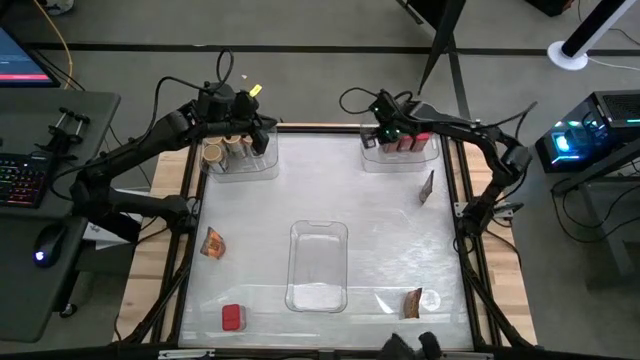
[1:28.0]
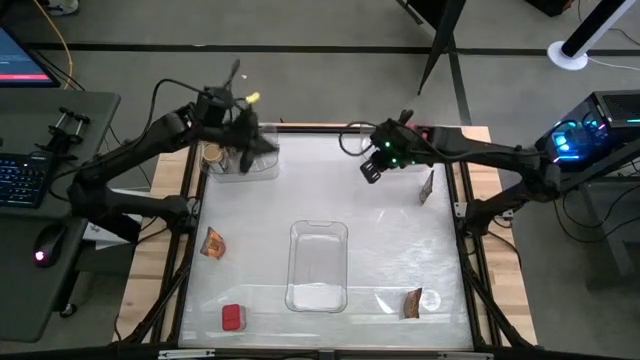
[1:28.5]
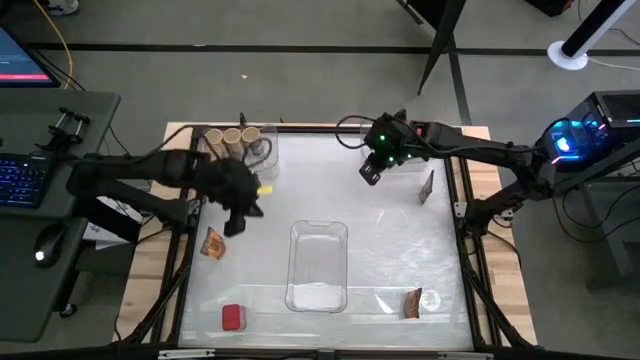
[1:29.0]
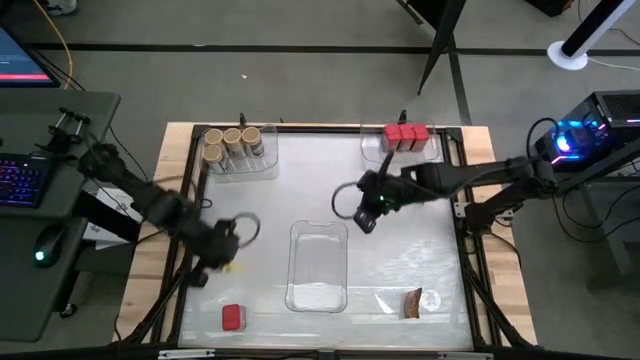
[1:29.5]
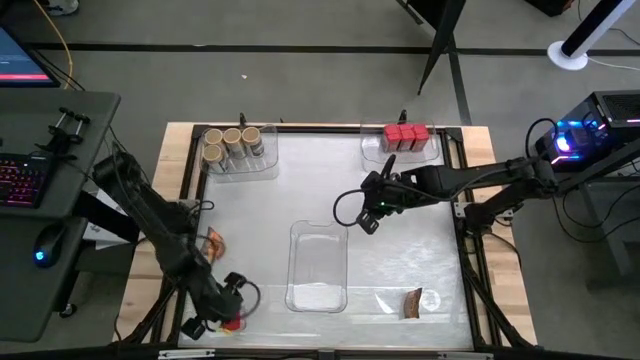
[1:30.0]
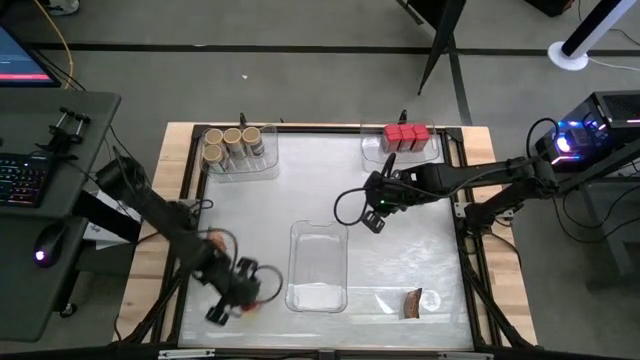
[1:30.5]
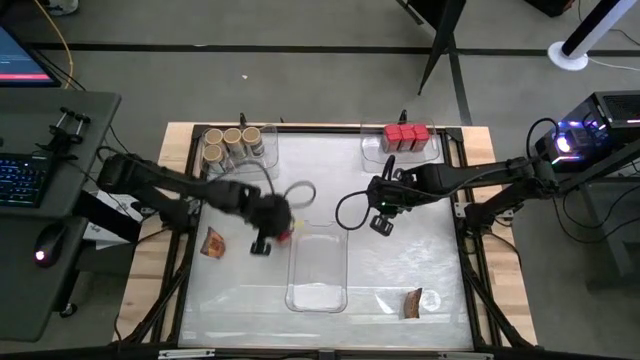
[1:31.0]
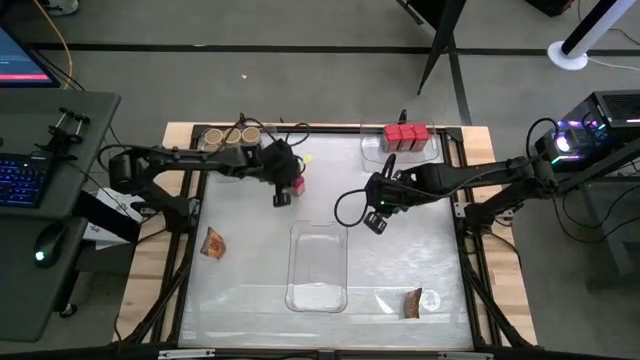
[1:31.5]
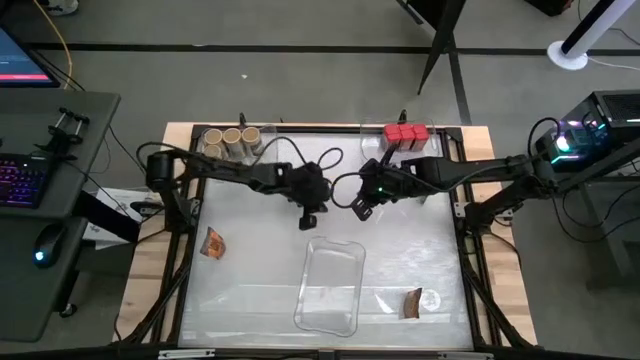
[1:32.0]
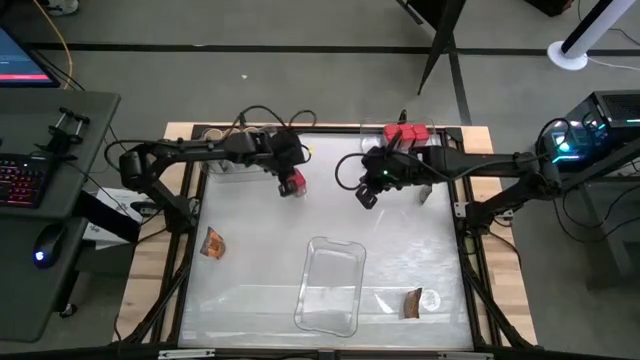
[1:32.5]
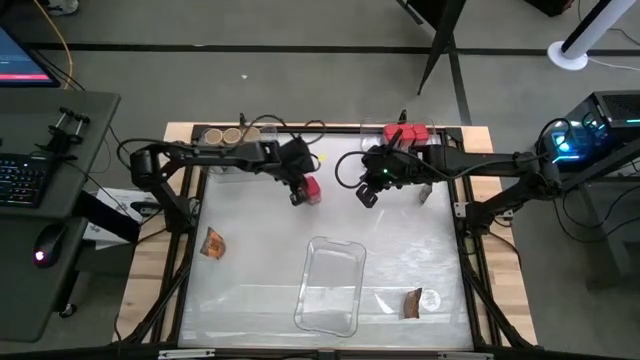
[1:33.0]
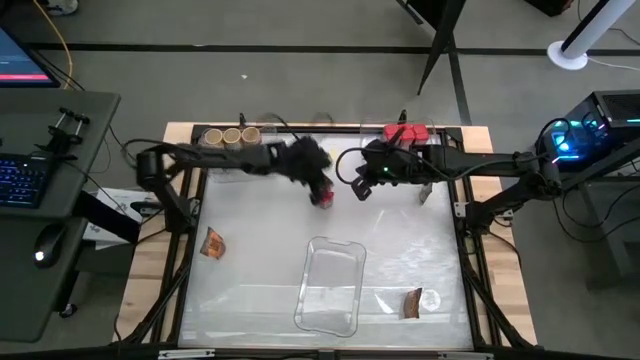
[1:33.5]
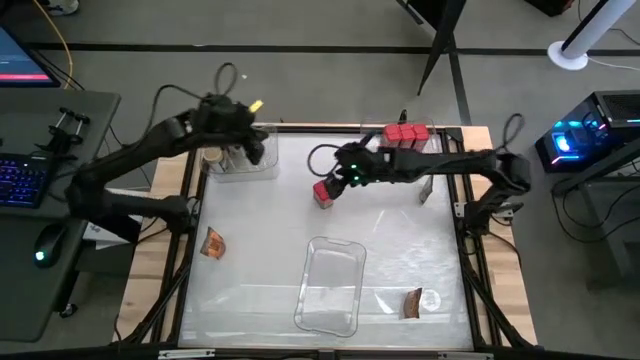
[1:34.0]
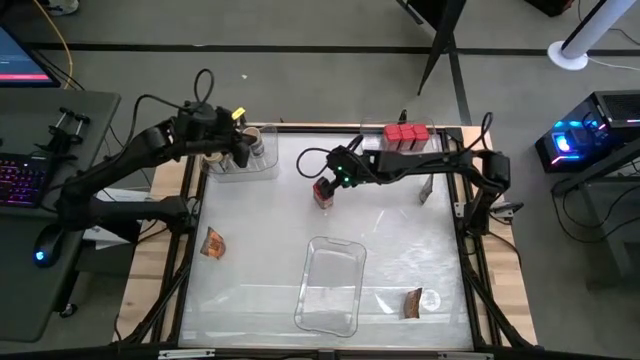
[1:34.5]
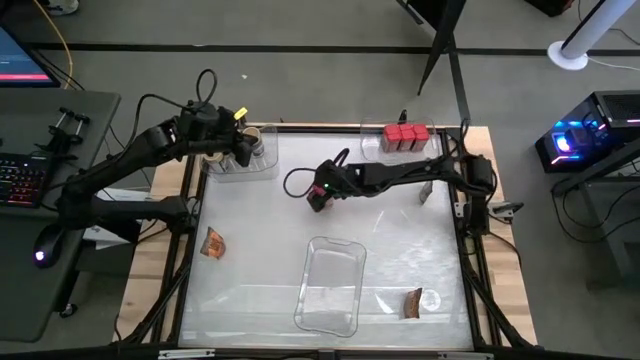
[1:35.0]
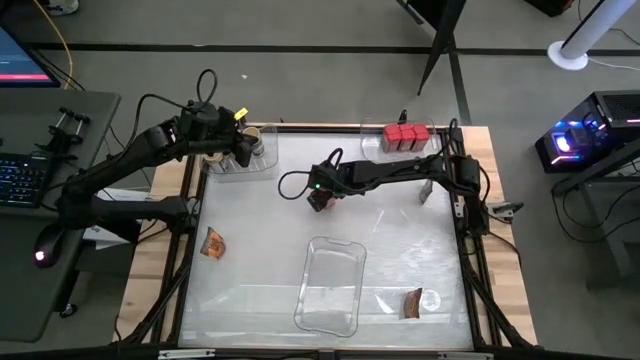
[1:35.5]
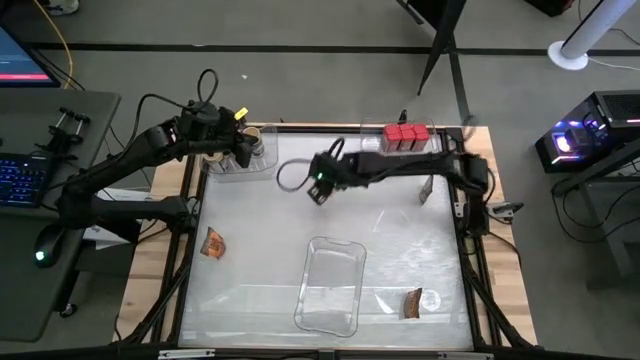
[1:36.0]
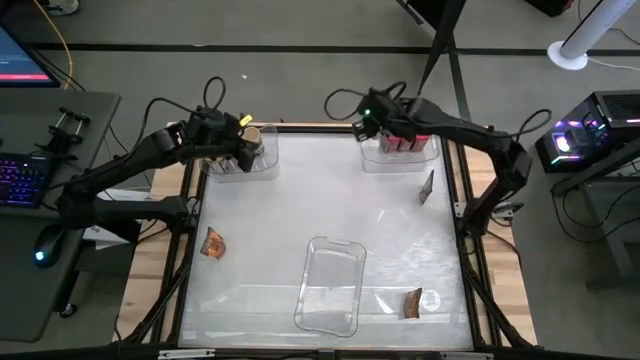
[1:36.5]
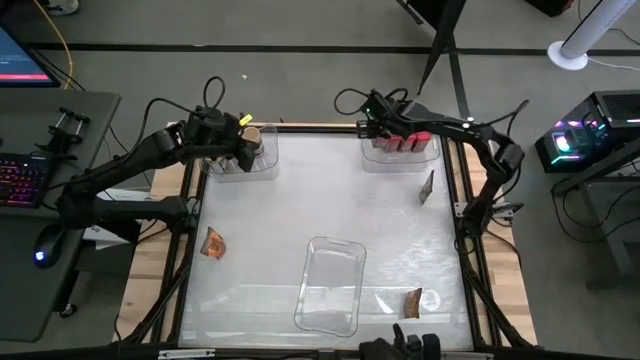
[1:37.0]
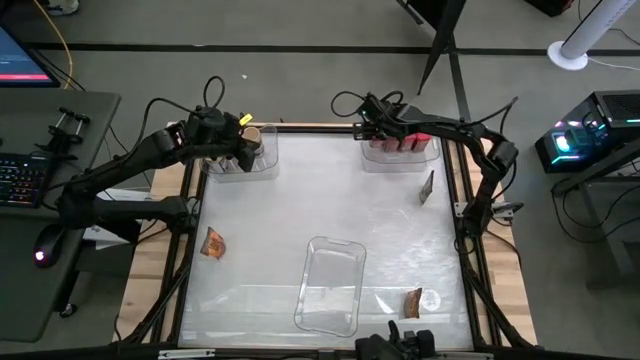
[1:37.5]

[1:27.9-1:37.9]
Task: Sort spices by type
Put the red seasoning can into the top right transparent bin

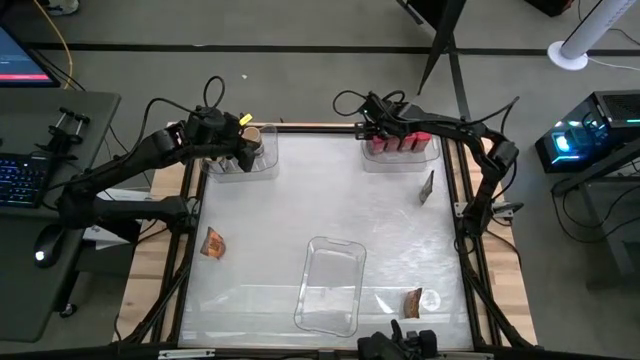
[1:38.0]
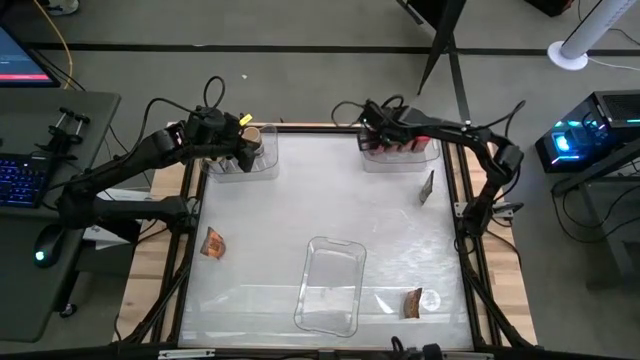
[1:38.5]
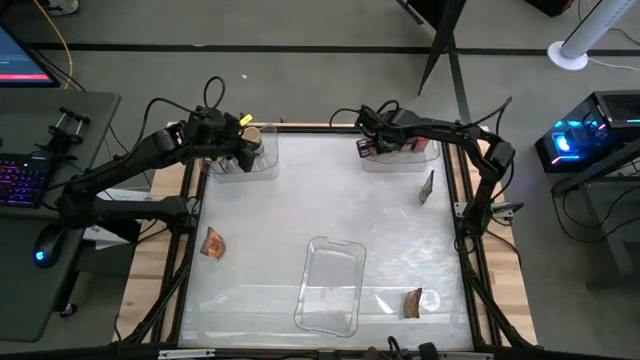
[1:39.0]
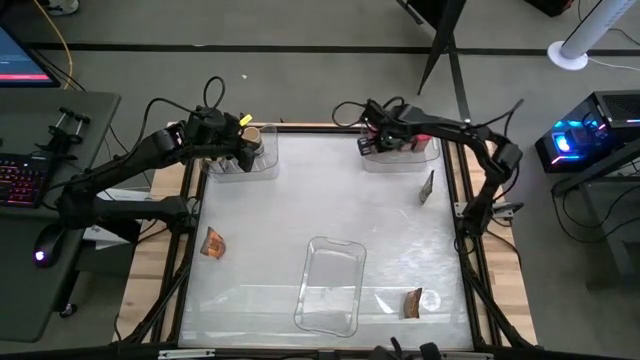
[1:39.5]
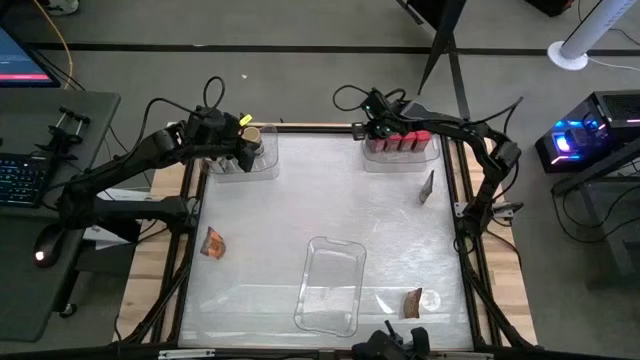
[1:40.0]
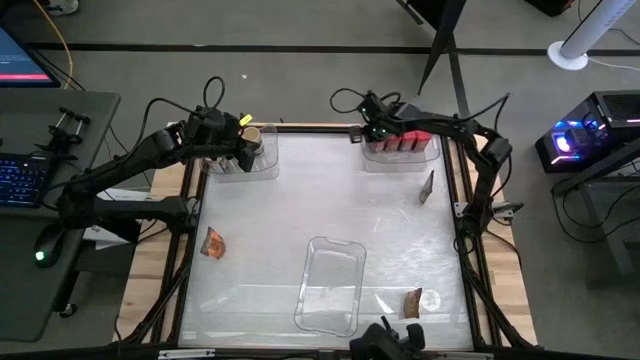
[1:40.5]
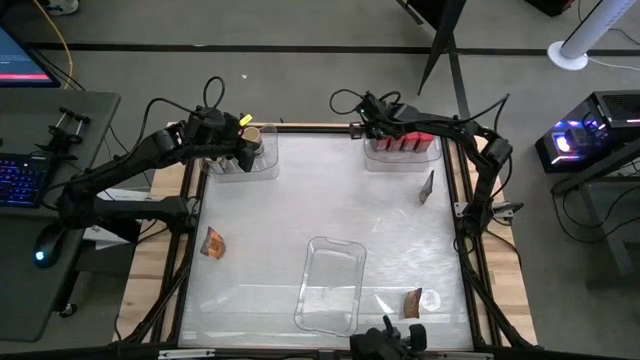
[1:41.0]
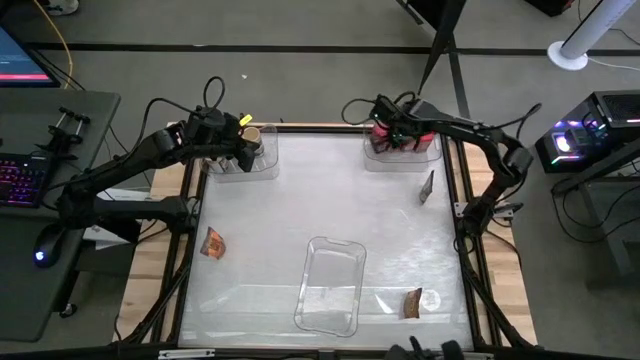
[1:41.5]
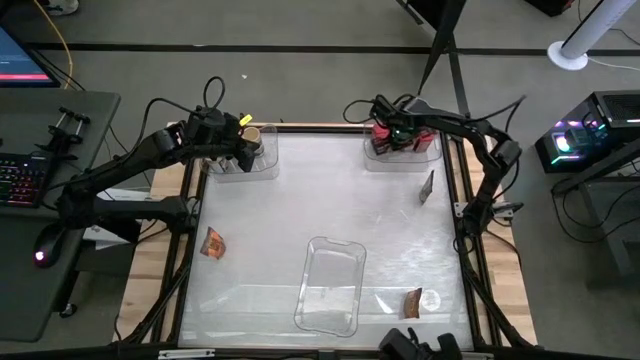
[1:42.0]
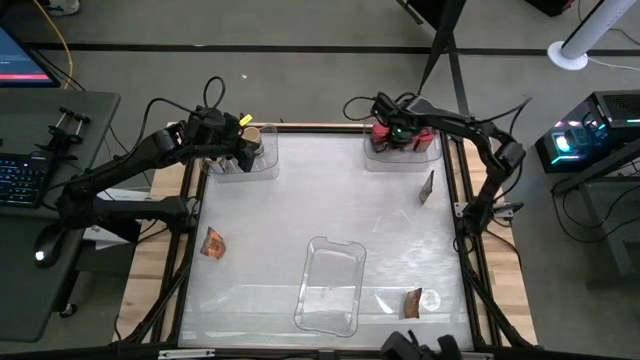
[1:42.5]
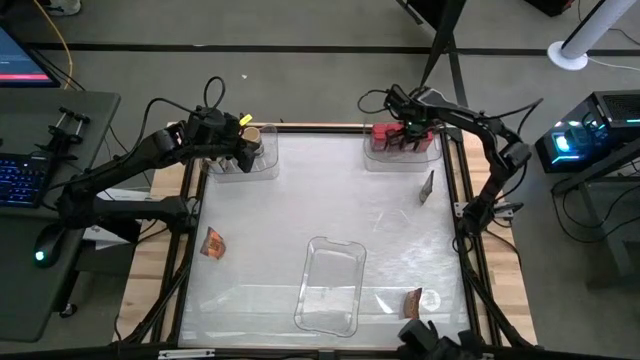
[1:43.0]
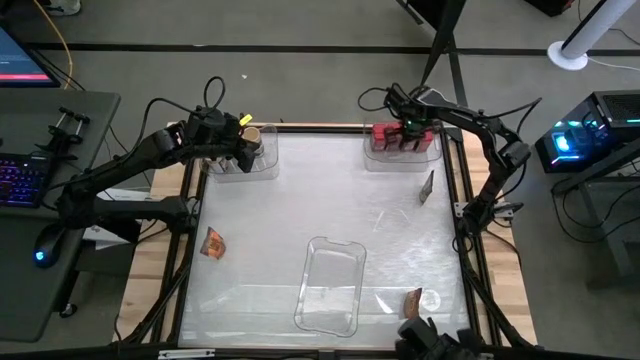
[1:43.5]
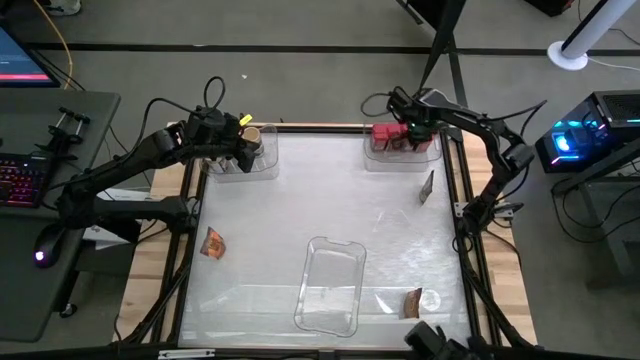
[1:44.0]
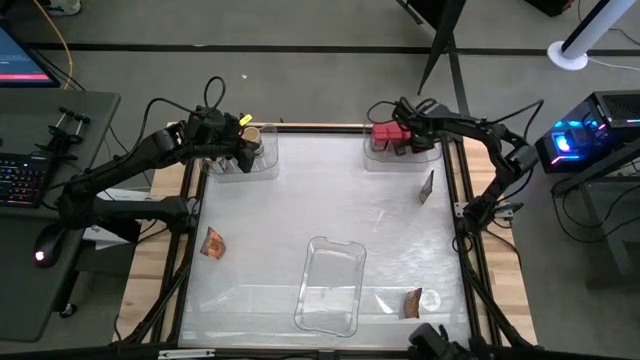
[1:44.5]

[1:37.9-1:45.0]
Adjust the red seasoning cans

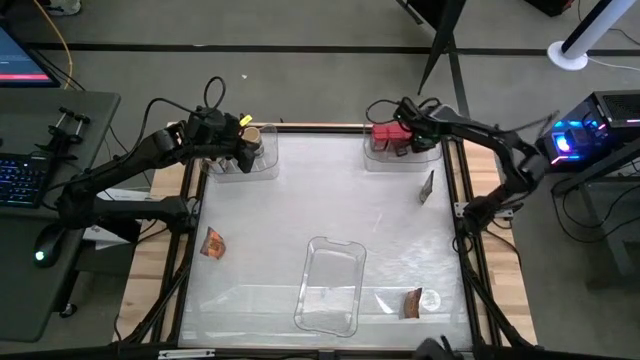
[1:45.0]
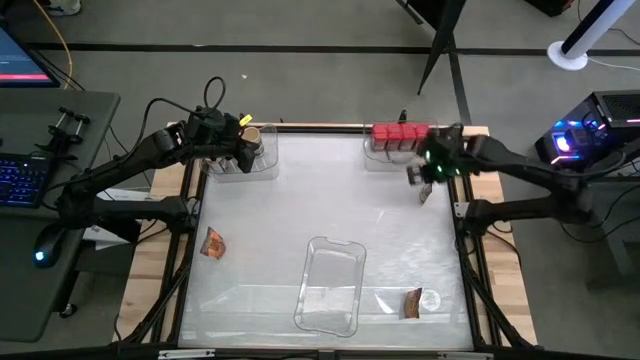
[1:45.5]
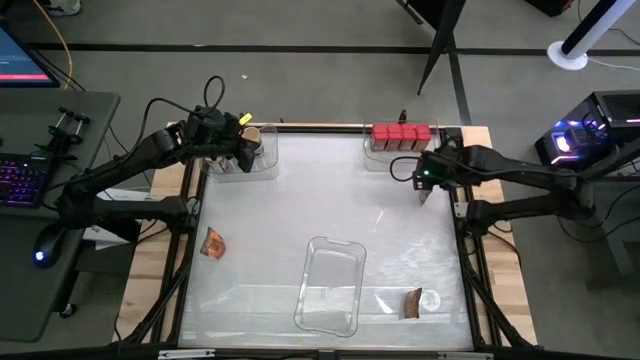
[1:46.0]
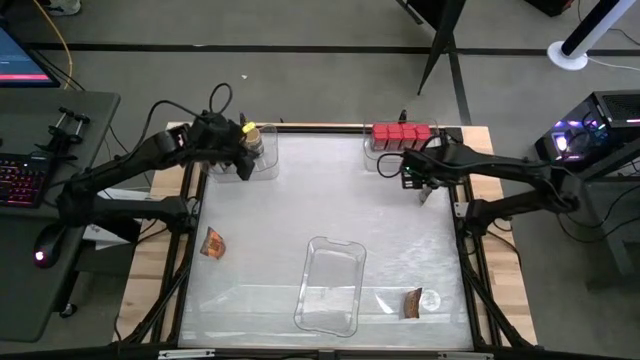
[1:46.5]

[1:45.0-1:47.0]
Put the top orange seasoning pack into the bottom transparent bin

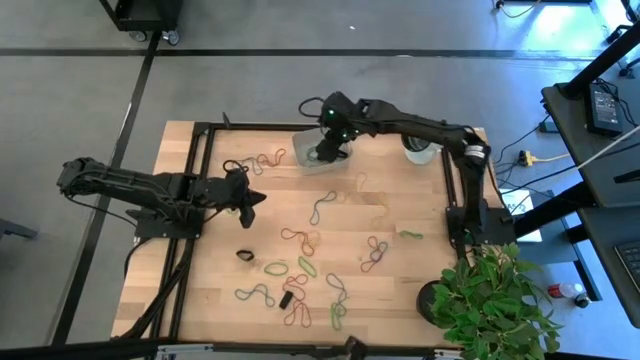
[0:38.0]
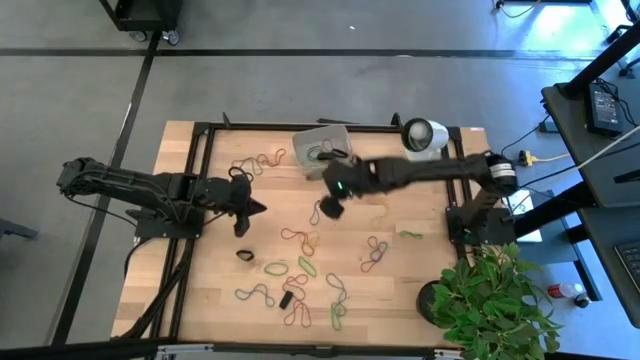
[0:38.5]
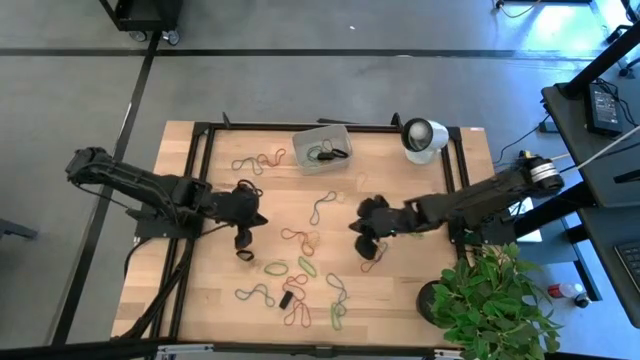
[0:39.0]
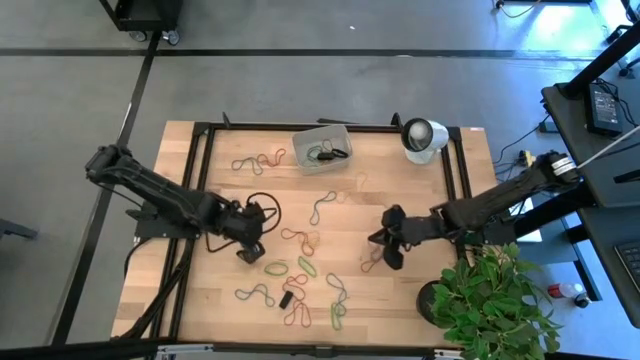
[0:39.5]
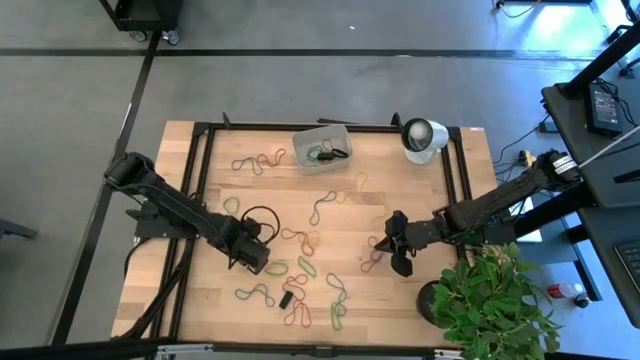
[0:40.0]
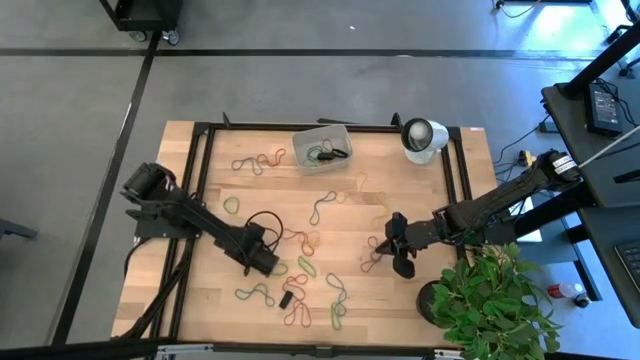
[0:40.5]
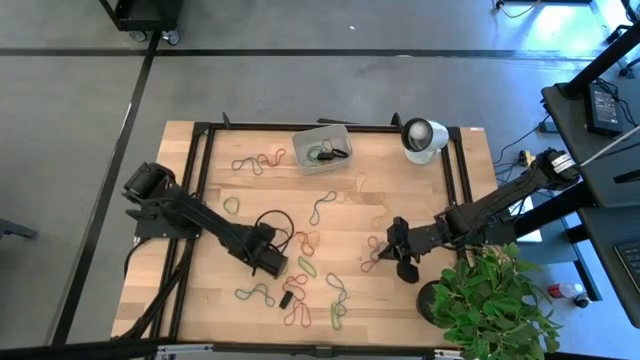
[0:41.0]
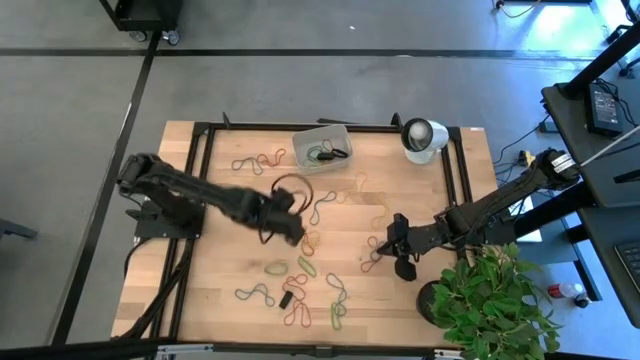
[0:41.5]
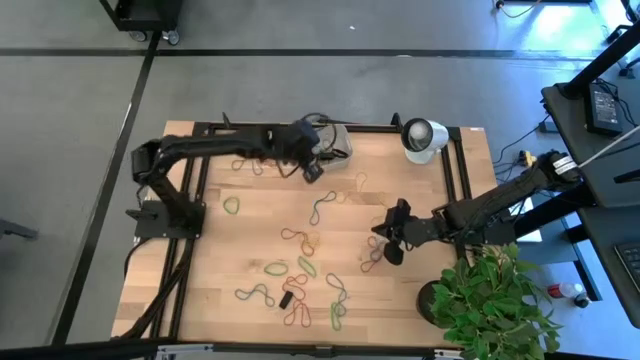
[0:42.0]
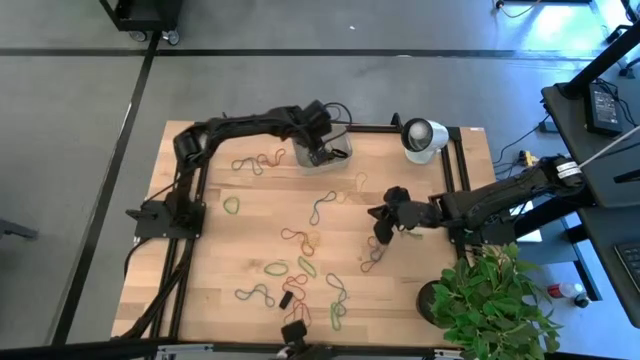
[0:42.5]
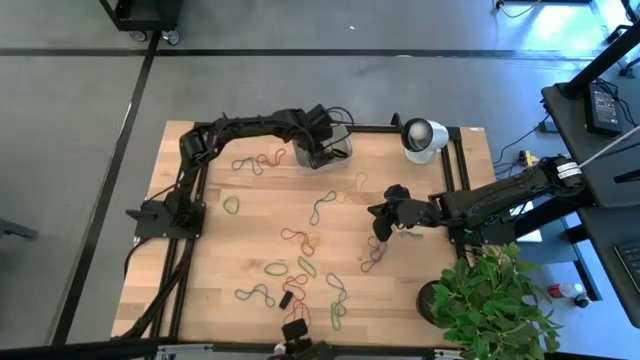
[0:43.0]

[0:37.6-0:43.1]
Task: Pick and place rubber bands into bin
Put the top black rubber band into the gray bin
